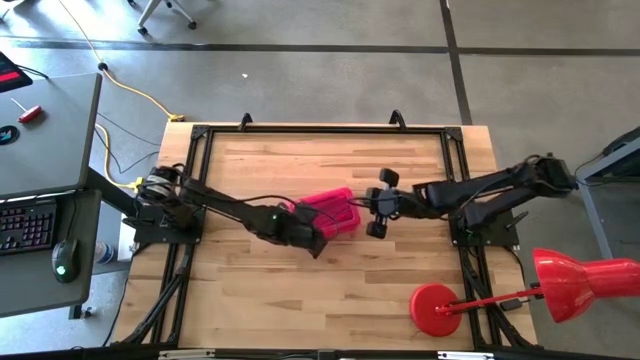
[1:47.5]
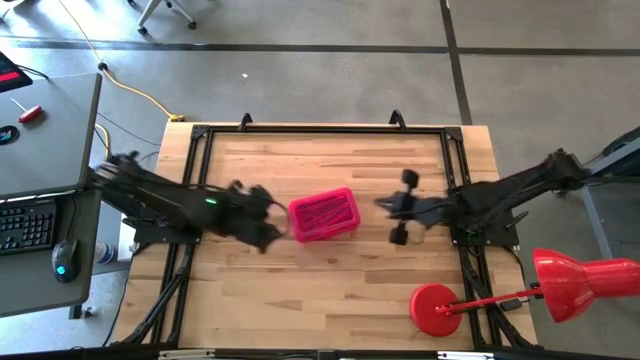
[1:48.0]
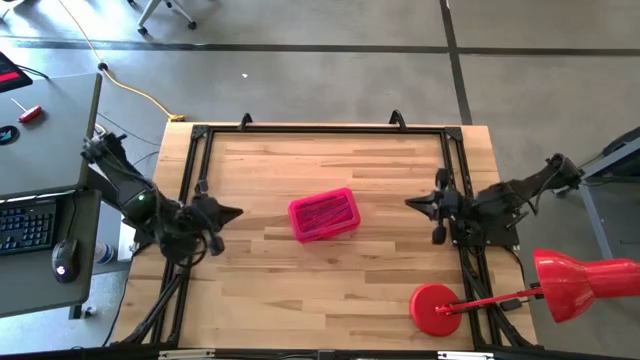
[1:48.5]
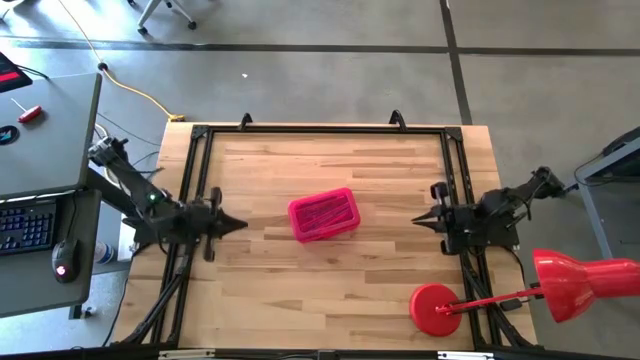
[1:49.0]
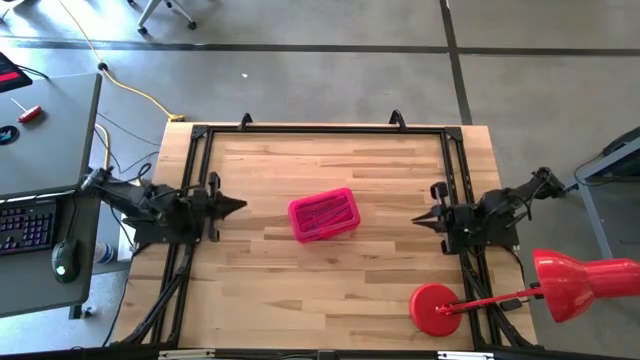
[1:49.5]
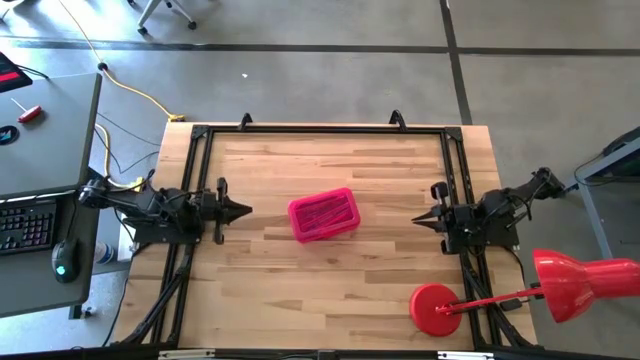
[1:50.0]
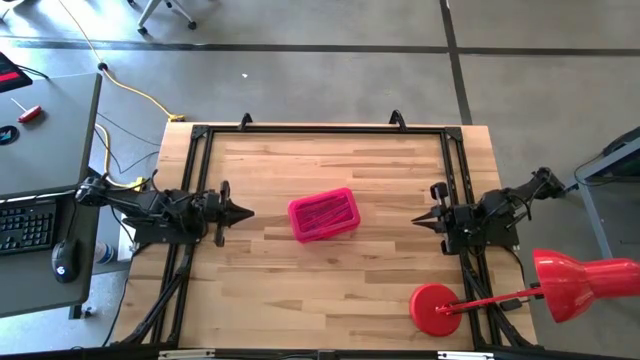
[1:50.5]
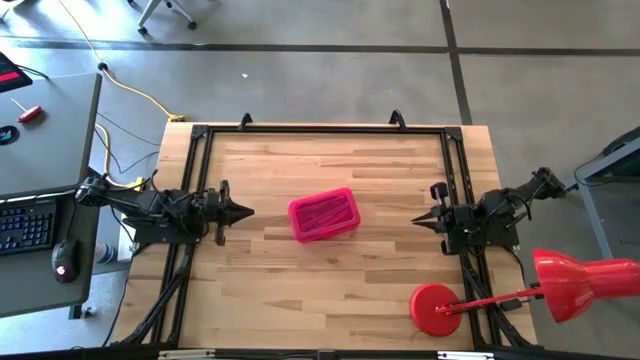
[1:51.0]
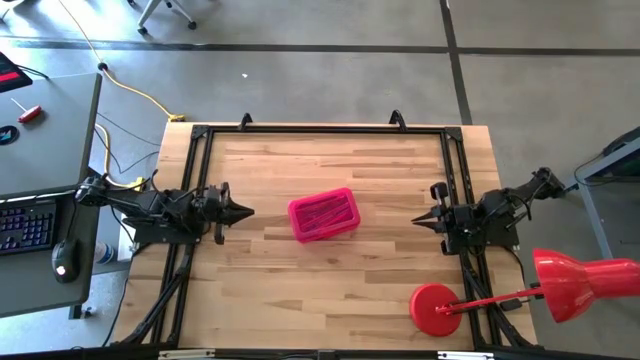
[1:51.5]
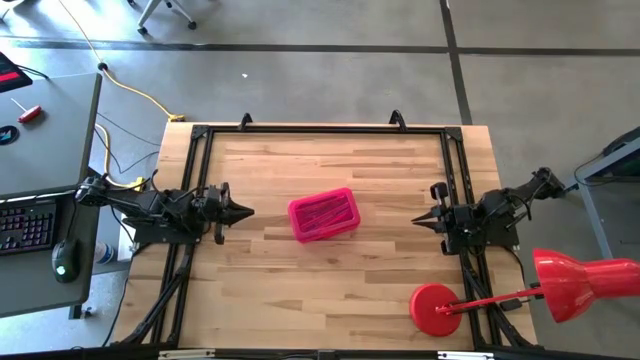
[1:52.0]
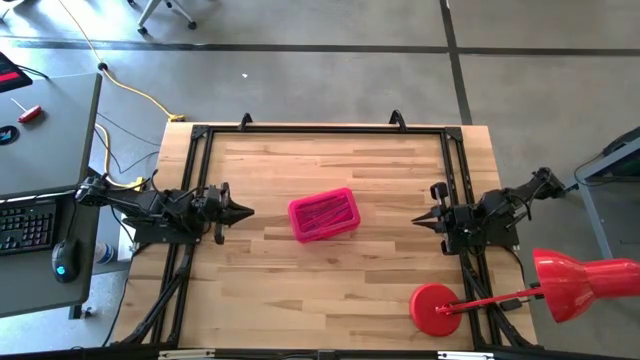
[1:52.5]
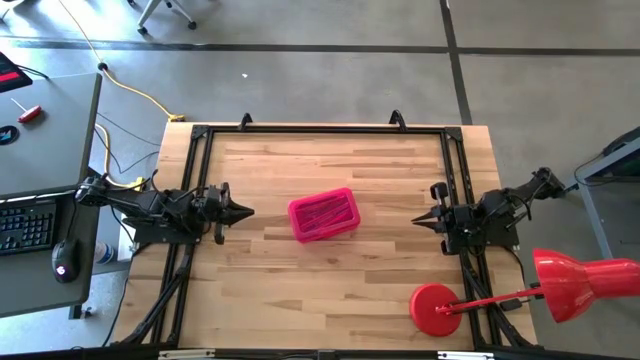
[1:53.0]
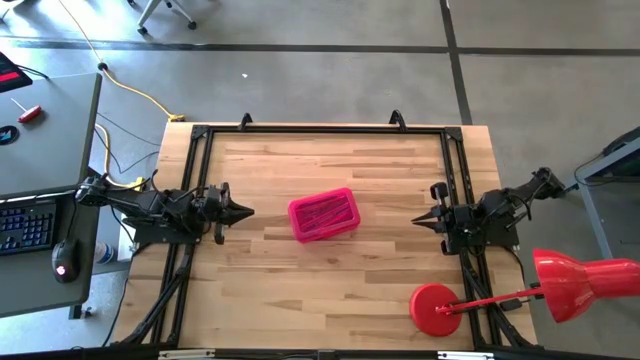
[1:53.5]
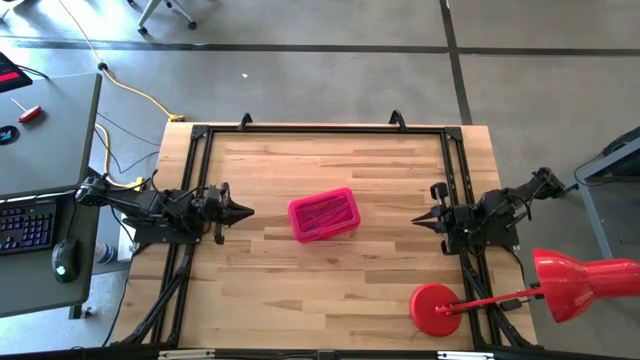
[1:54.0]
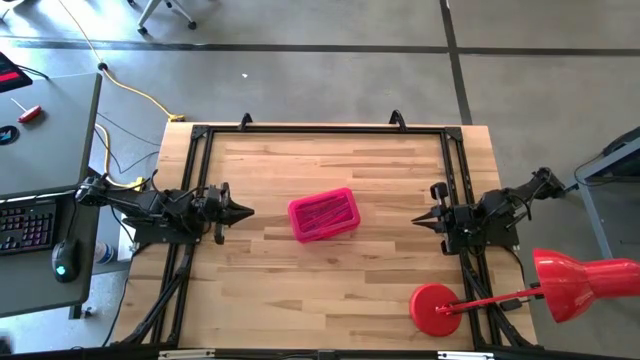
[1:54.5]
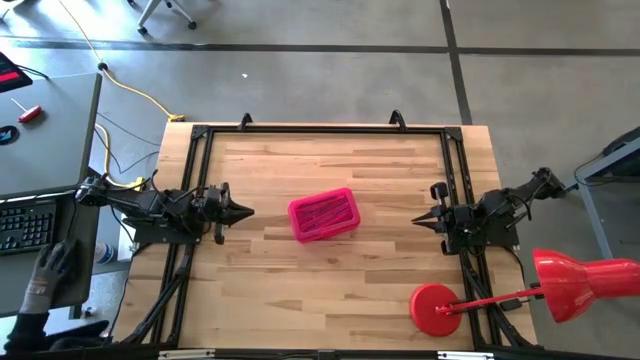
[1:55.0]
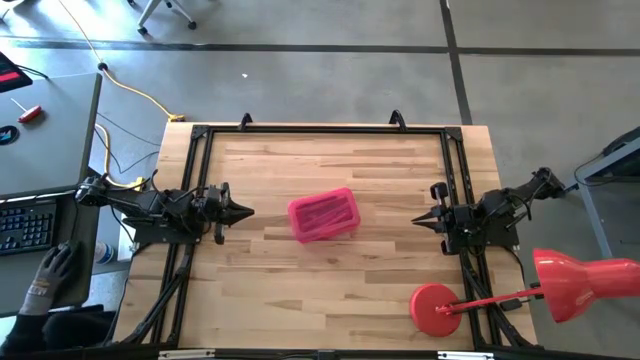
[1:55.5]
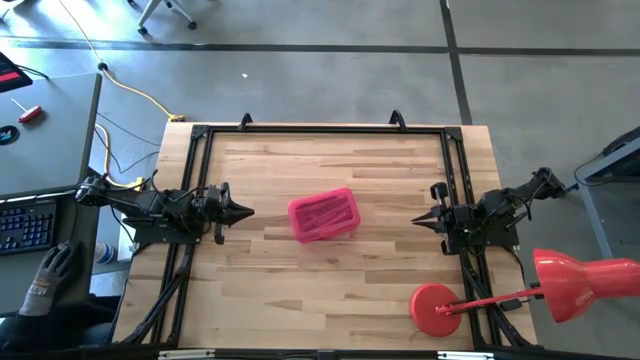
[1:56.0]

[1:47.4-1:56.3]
Task: Pick & place school supplies into a supply box
Return to Home Position

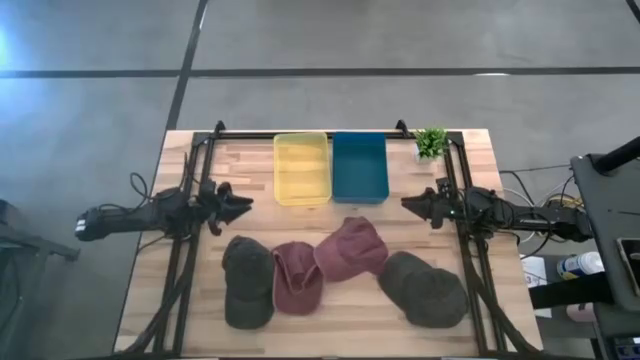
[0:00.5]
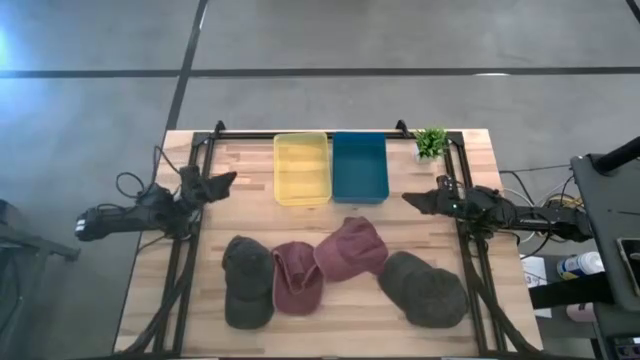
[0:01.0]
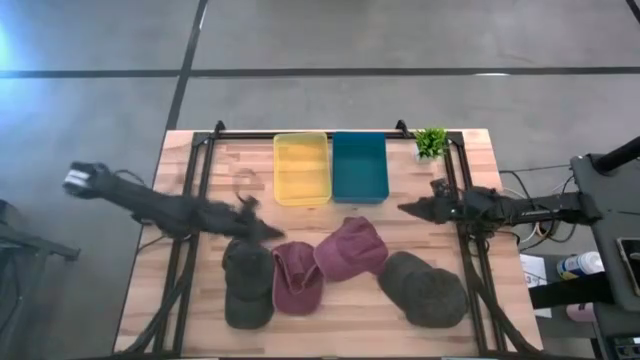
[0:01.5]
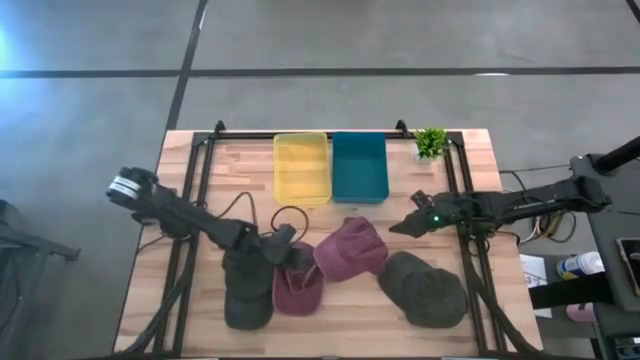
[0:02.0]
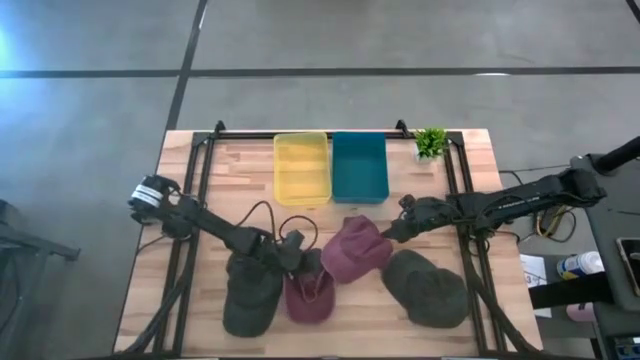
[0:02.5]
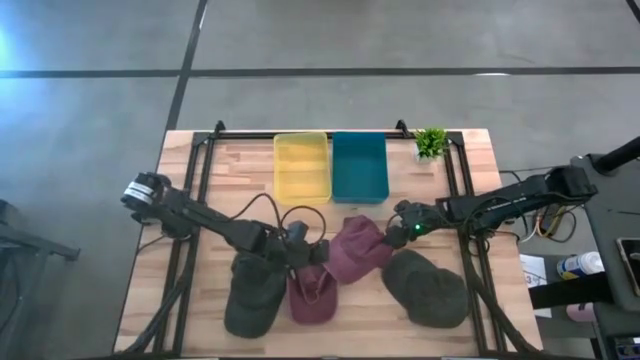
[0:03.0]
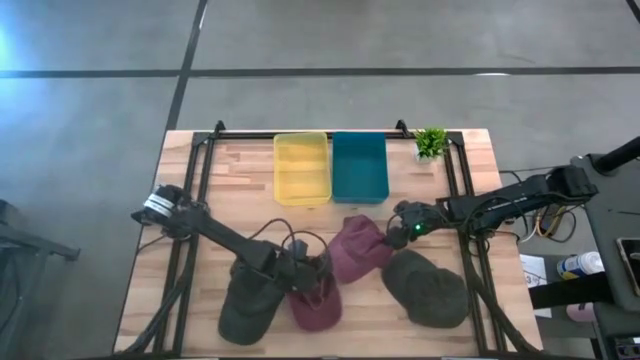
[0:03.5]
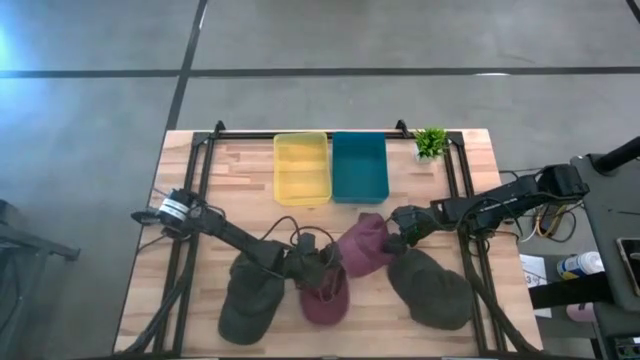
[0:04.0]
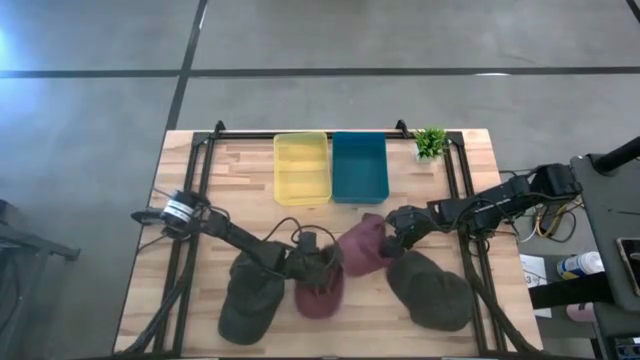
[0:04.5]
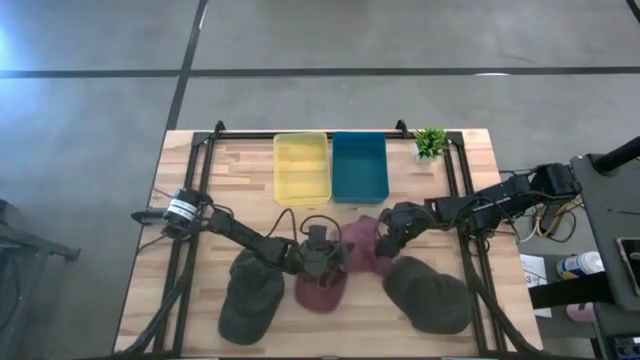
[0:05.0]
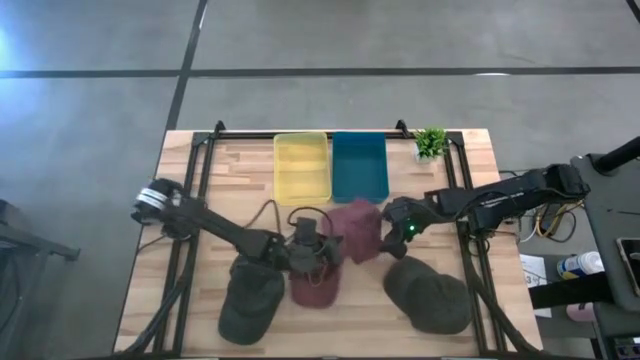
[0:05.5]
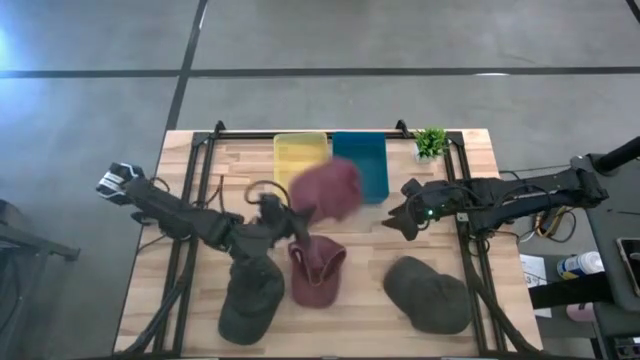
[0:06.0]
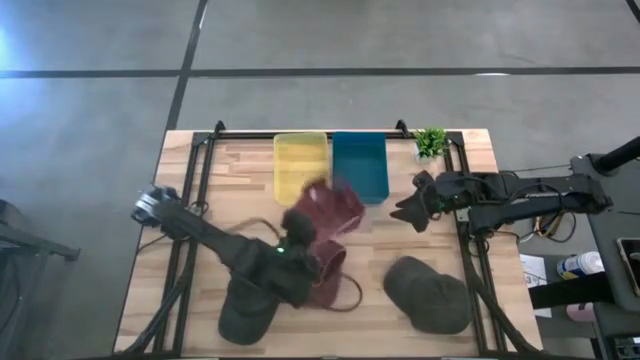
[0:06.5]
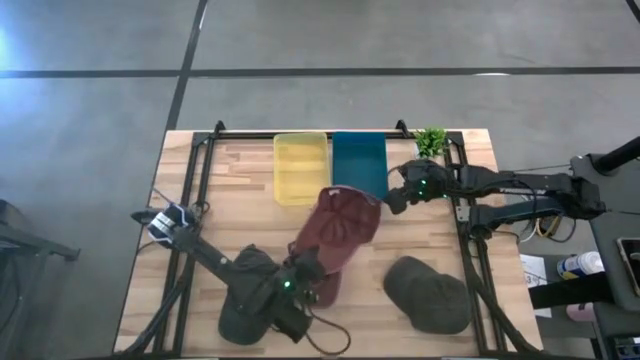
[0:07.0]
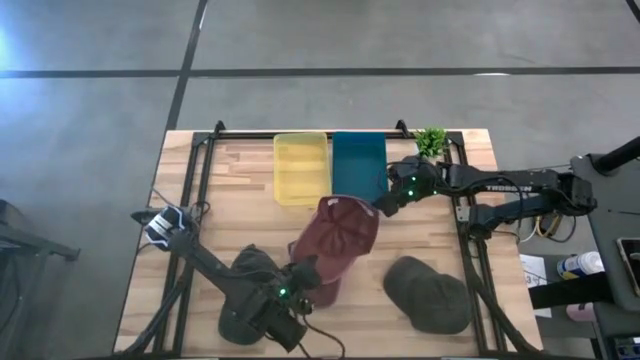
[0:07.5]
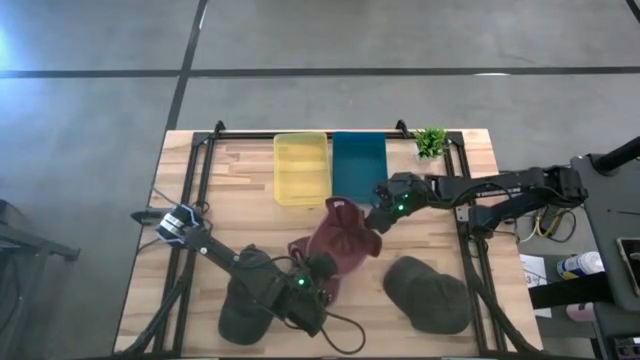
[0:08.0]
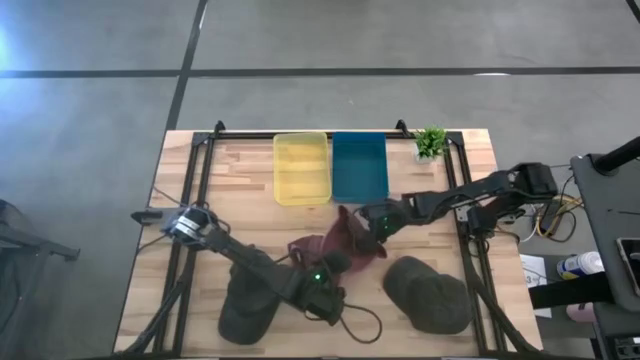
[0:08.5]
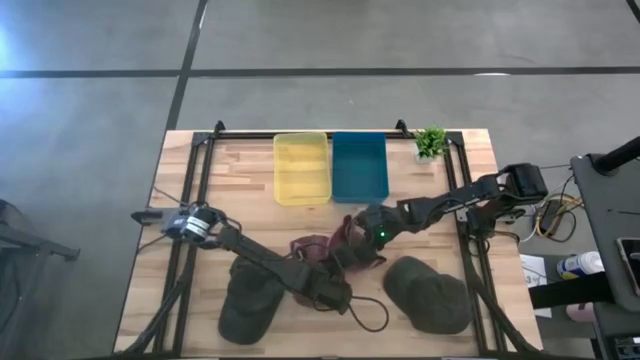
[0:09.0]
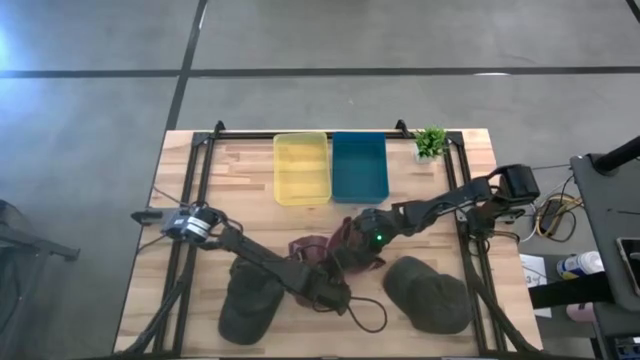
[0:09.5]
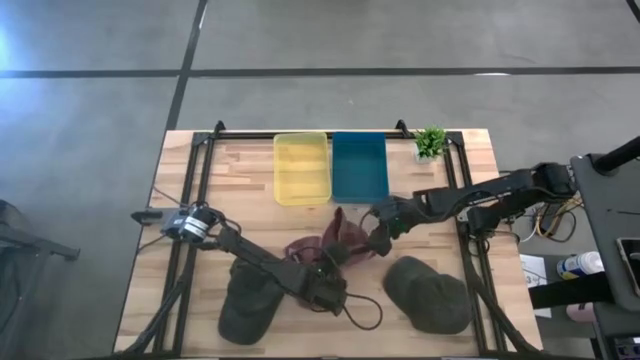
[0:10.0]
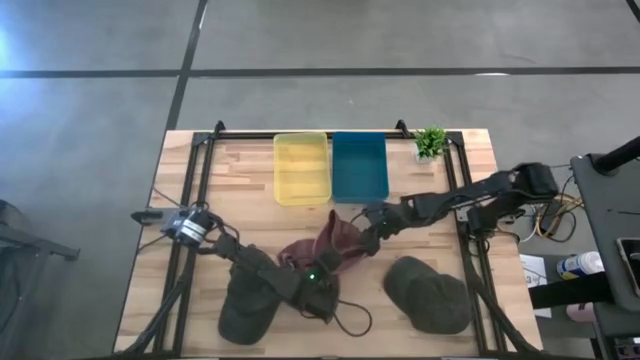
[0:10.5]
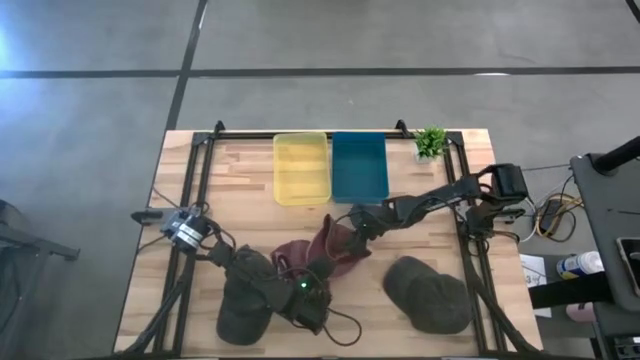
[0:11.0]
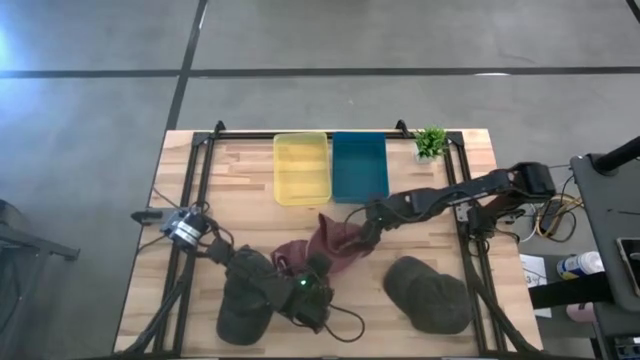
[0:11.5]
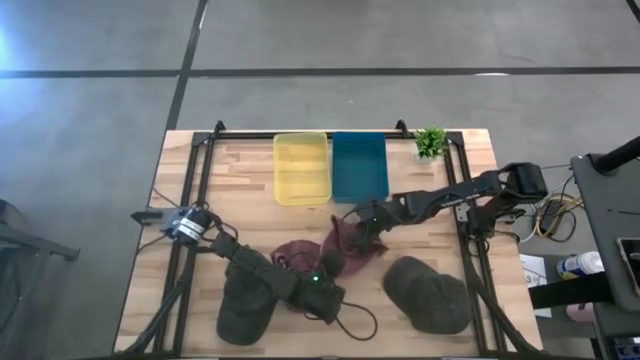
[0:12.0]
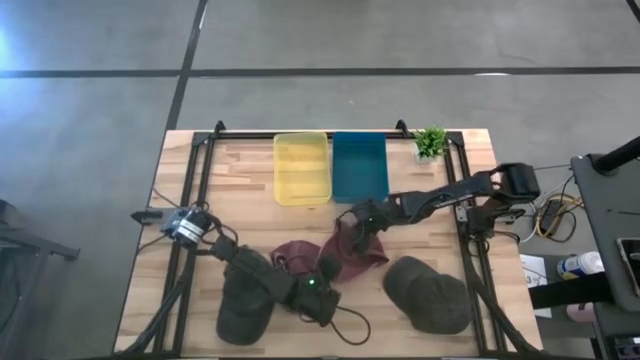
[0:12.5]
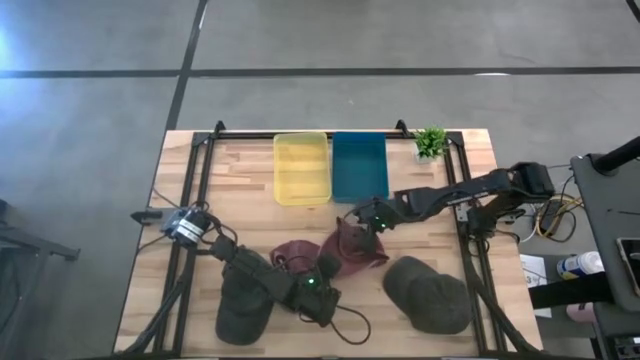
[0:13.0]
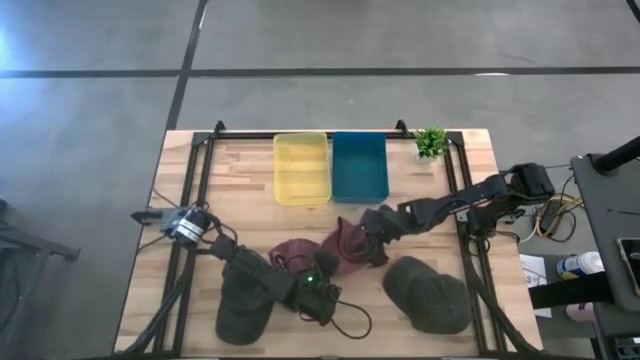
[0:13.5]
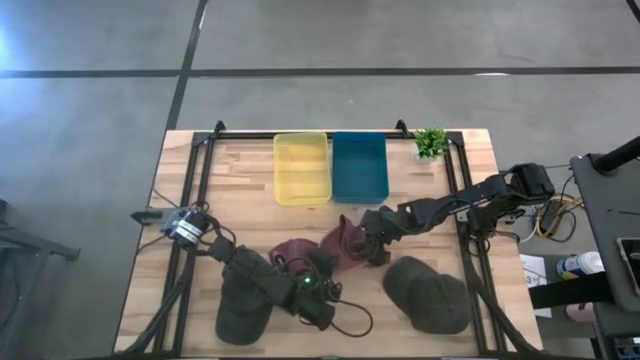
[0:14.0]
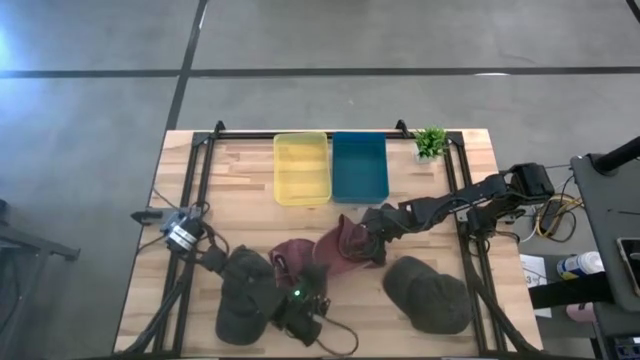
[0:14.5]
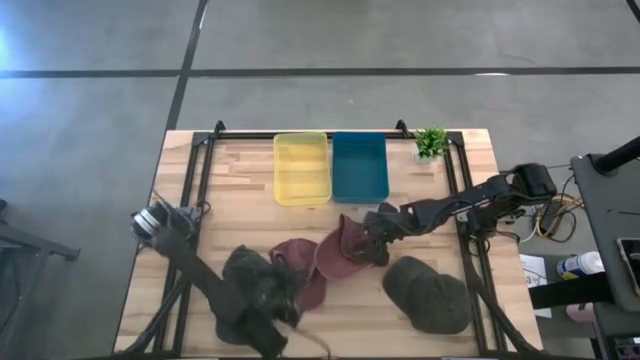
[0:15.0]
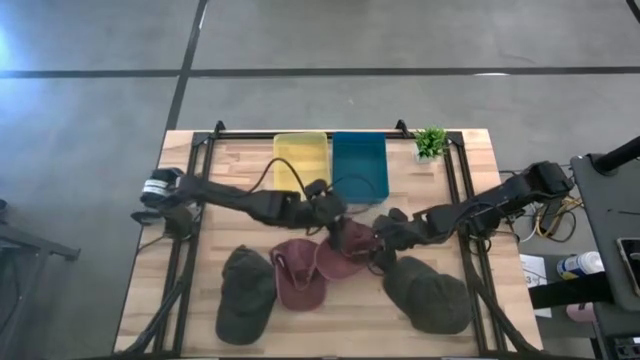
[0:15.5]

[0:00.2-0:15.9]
Task: Sort caps
Put the left red cap into the blue bin
